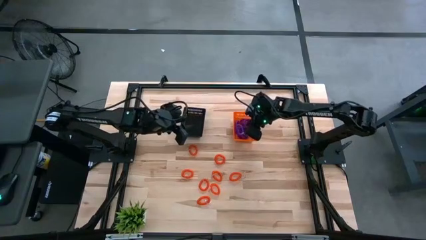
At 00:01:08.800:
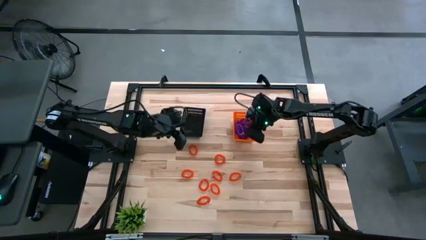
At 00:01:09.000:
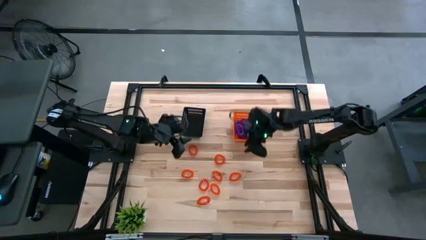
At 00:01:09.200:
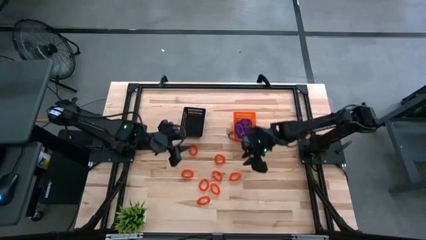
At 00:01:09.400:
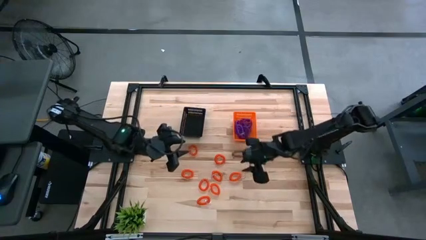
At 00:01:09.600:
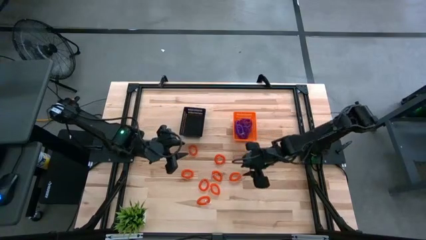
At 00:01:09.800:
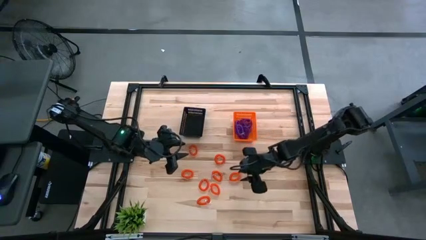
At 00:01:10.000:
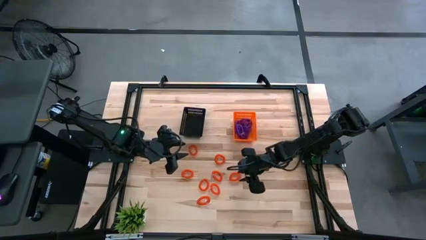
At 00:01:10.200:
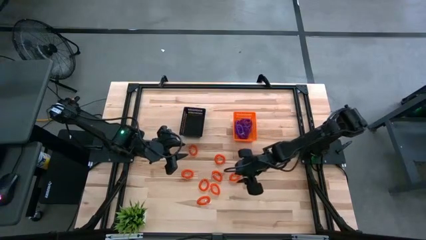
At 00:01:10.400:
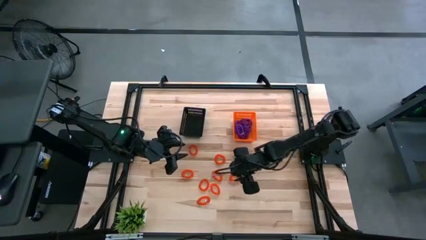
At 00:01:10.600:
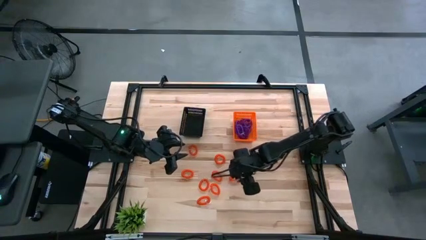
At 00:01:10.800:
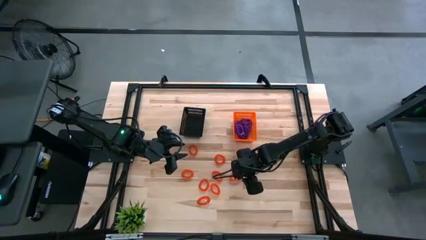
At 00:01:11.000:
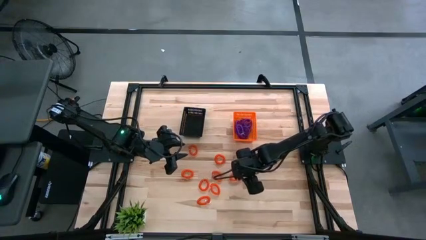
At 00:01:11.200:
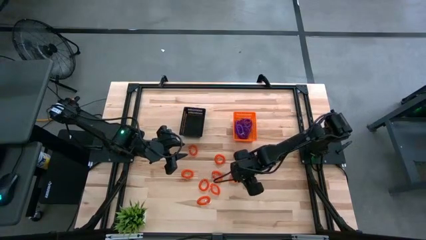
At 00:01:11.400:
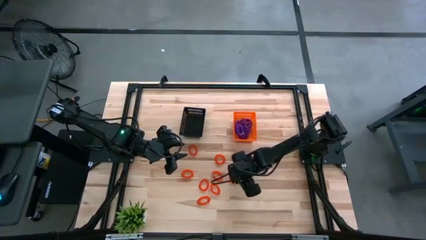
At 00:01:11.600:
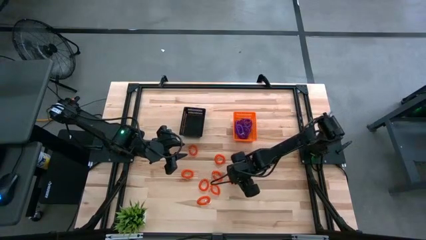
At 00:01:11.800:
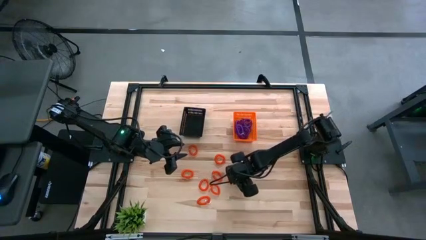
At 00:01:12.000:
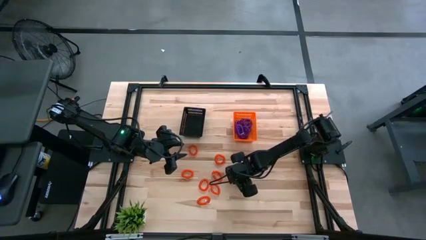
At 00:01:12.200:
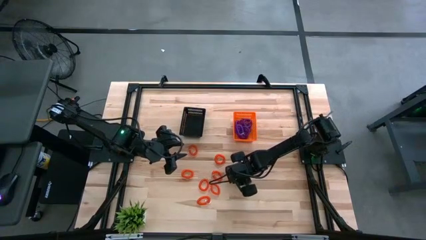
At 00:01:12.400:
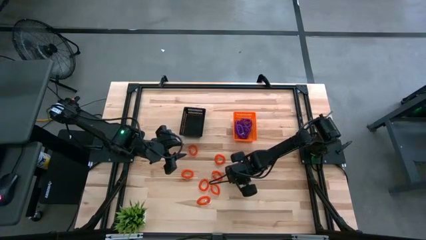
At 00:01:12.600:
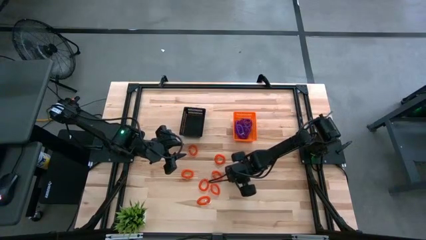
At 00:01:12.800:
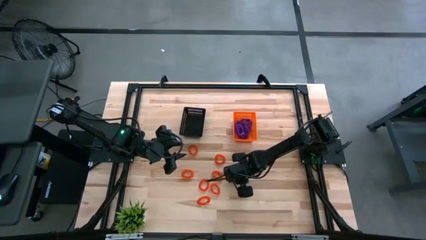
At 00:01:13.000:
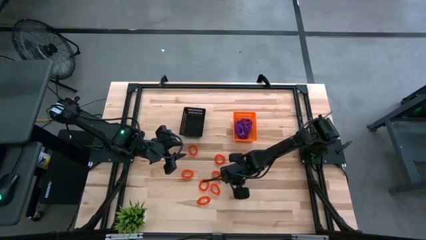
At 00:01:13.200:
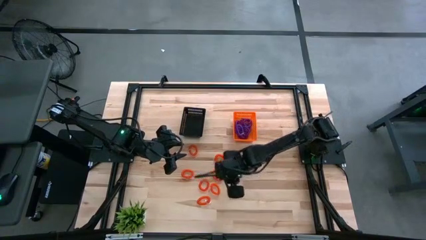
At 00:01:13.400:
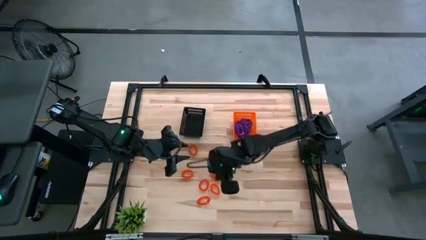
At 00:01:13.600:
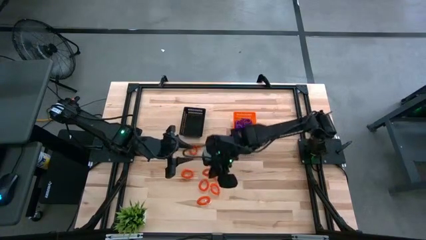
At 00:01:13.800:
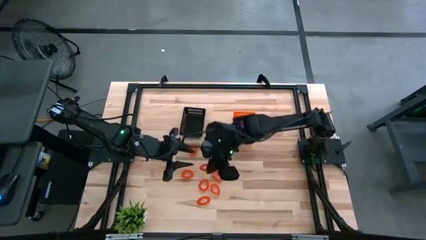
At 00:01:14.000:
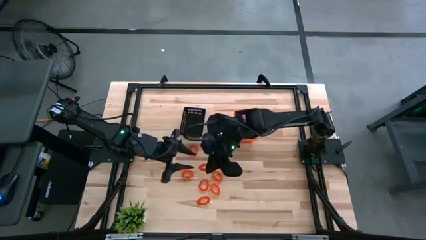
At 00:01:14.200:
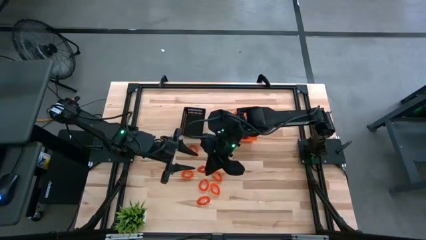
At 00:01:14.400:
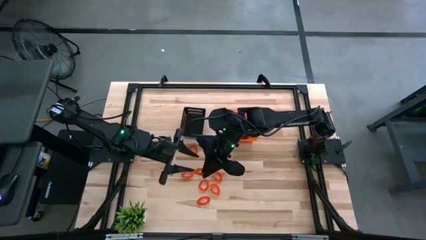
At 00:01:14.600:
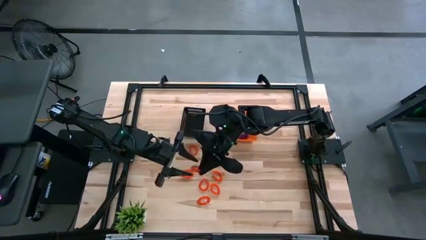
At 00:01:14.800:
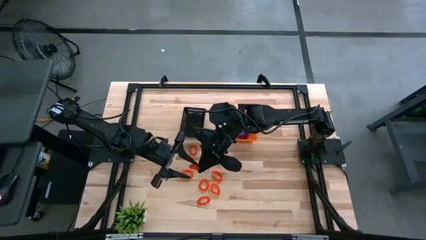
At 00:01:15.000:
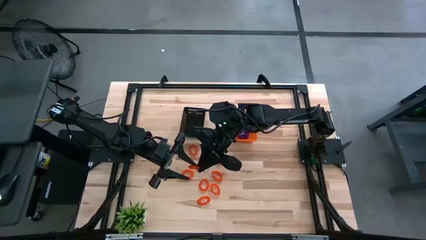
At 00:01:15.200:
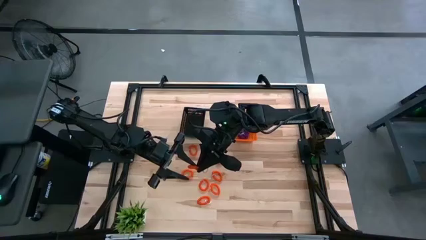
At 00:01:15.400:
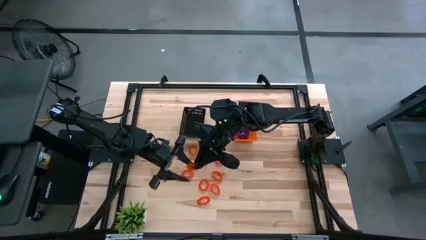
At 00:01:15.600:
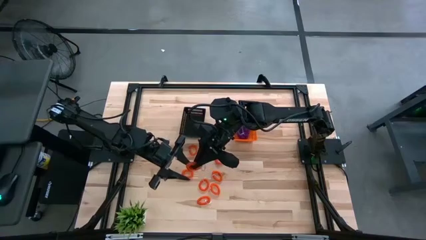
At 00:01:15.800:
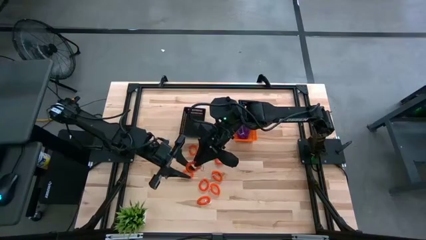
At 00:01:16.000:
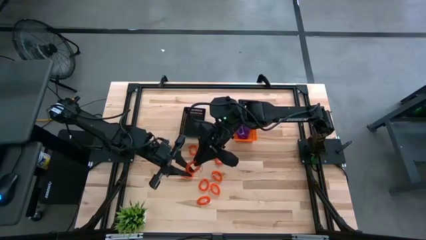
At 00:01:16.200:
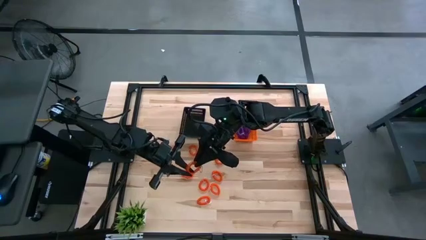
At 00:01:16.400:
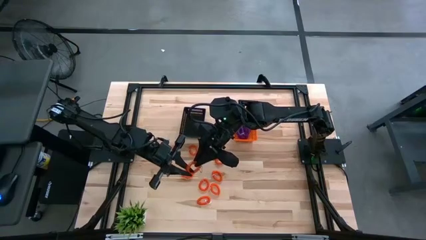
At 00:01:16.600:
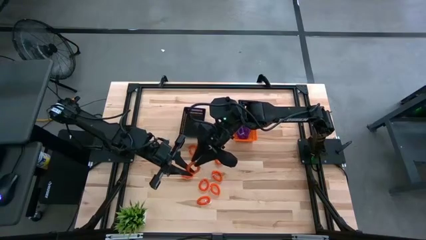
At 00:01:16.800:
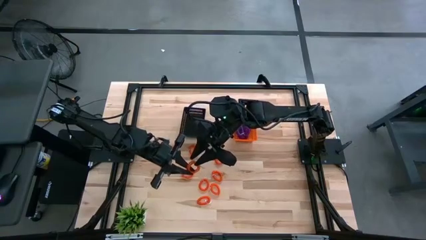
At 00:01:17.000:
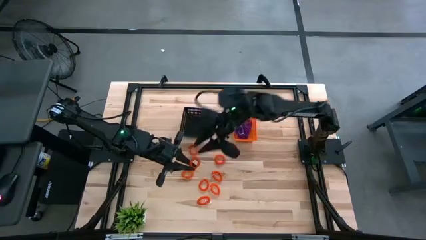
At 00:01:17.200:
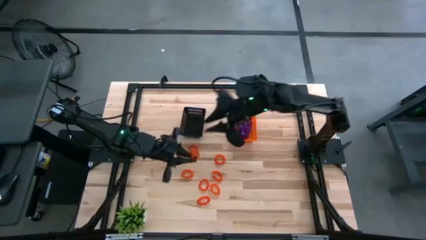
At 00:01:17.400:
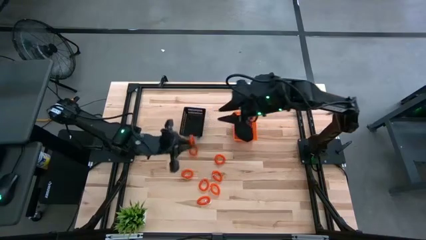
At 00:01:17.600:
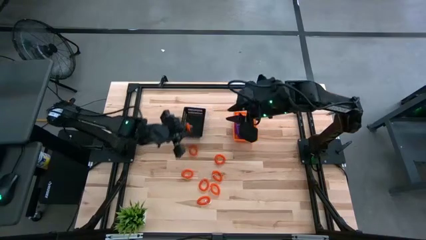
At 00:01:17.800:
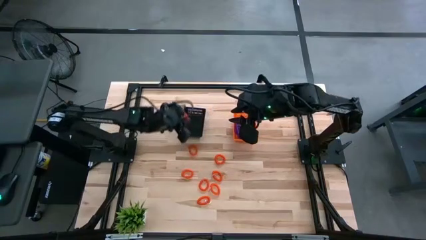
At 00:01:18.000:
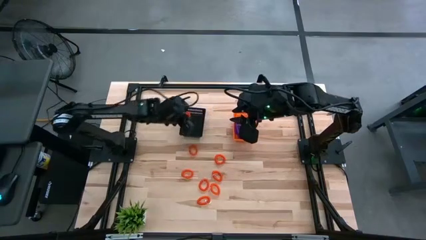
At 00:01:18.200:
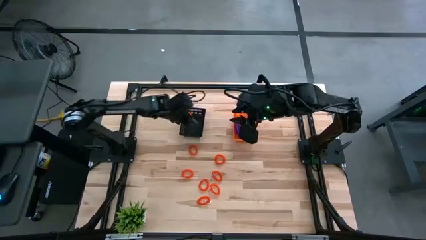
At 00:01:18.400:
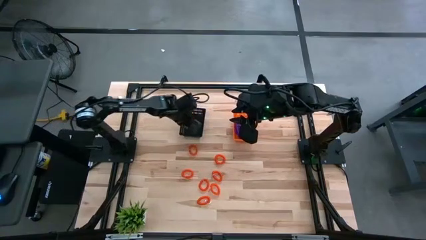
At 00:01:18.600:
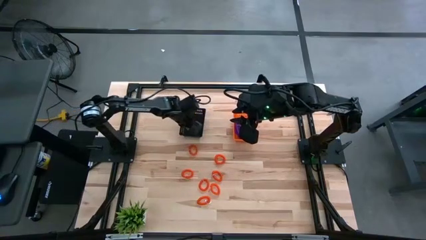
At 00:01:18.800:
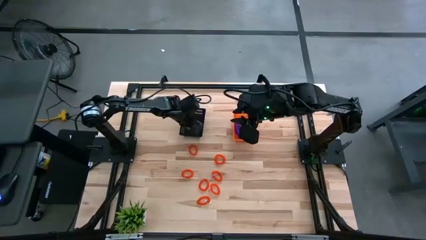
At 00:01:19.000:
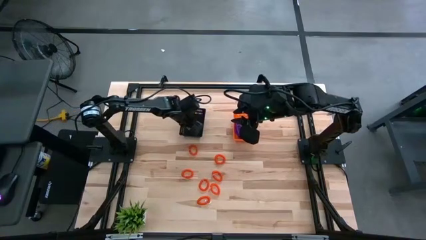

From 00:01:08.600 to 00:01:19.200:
Task: Sort spring keychains into baskets
Put the orange spring keychain into the black basket

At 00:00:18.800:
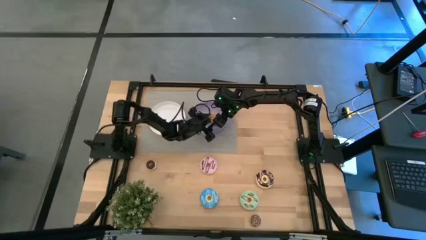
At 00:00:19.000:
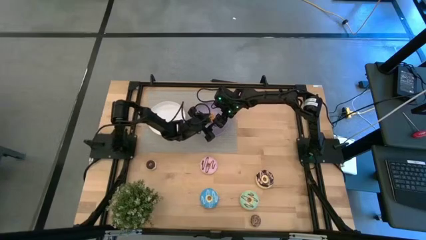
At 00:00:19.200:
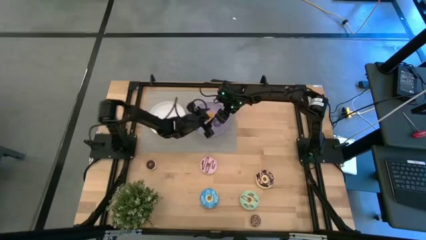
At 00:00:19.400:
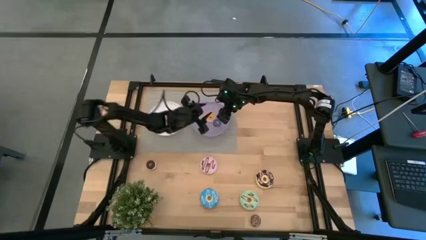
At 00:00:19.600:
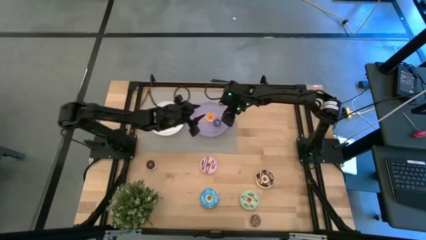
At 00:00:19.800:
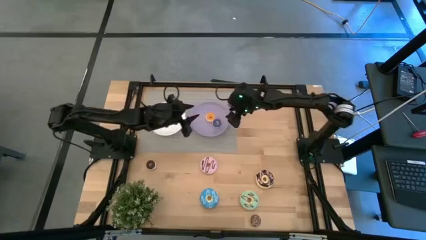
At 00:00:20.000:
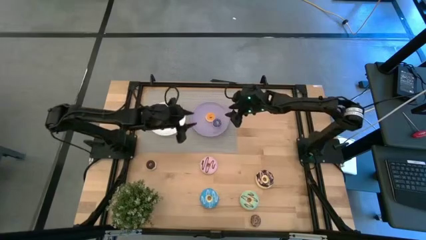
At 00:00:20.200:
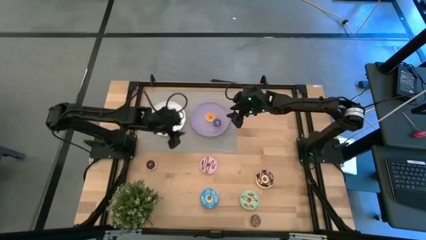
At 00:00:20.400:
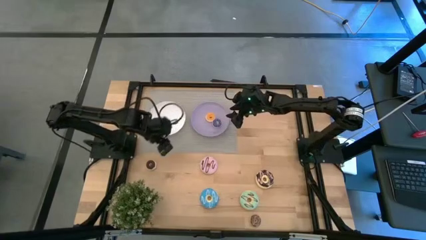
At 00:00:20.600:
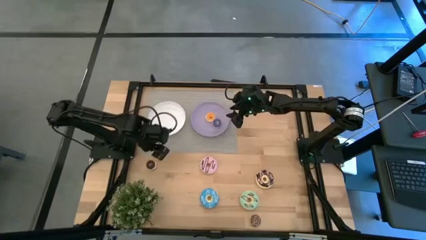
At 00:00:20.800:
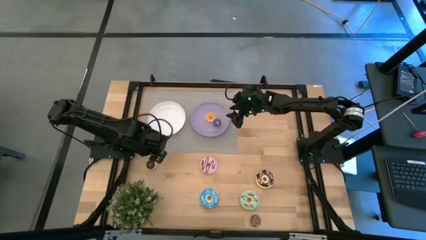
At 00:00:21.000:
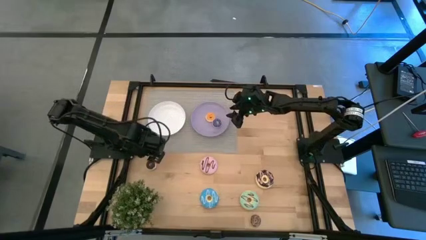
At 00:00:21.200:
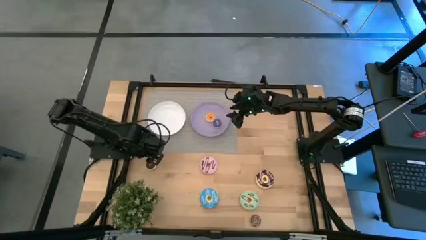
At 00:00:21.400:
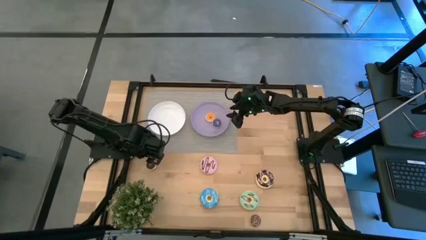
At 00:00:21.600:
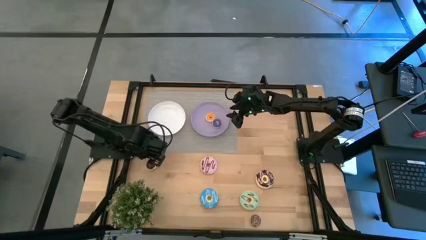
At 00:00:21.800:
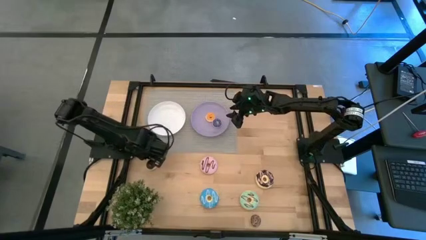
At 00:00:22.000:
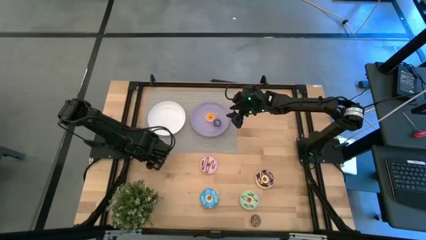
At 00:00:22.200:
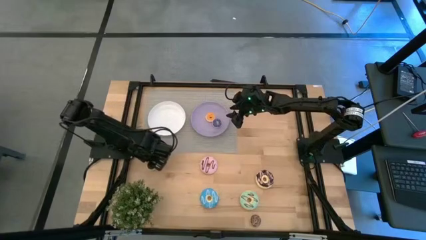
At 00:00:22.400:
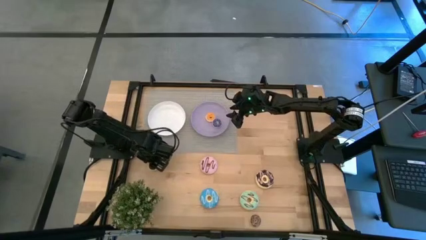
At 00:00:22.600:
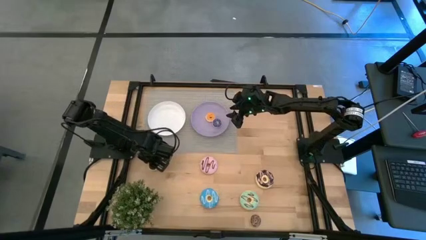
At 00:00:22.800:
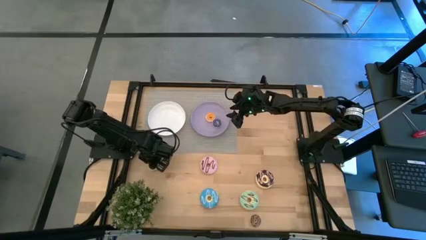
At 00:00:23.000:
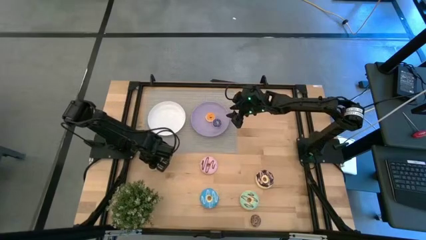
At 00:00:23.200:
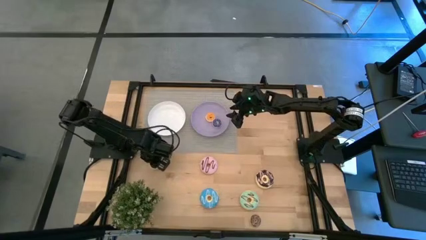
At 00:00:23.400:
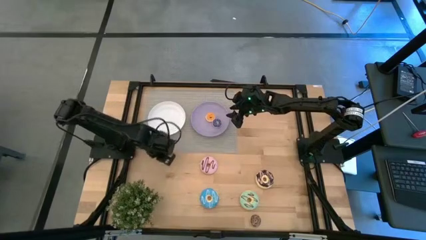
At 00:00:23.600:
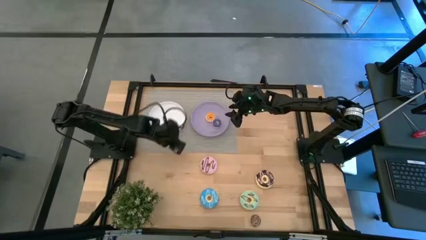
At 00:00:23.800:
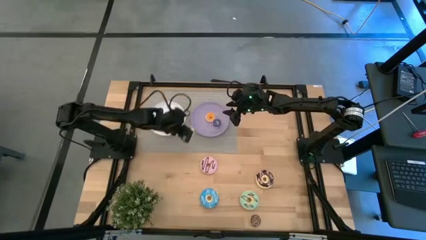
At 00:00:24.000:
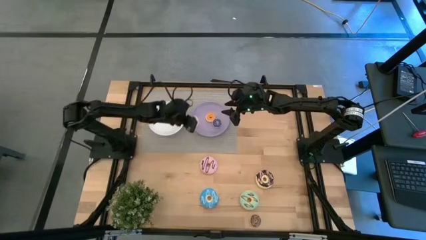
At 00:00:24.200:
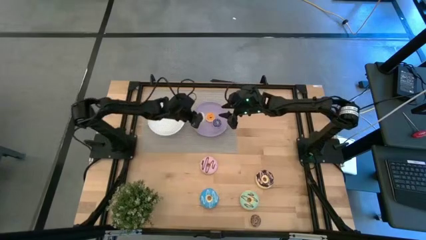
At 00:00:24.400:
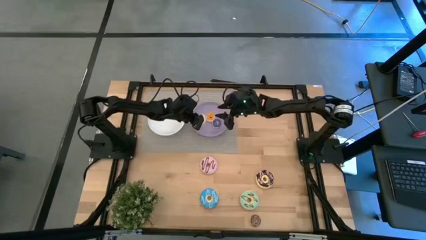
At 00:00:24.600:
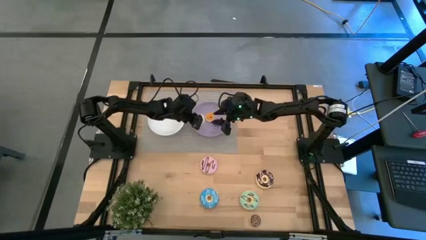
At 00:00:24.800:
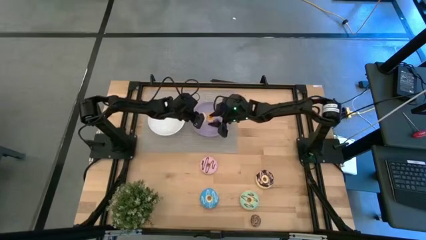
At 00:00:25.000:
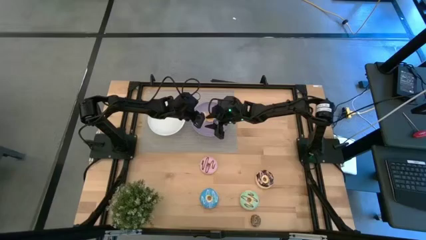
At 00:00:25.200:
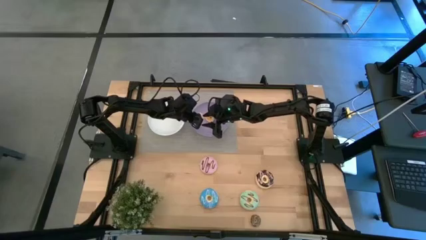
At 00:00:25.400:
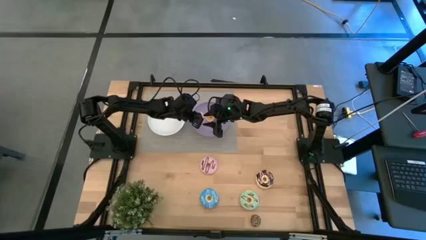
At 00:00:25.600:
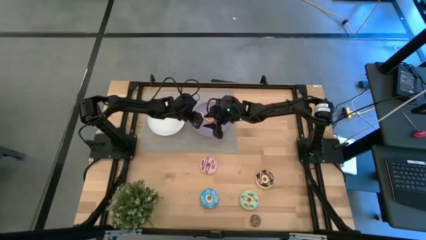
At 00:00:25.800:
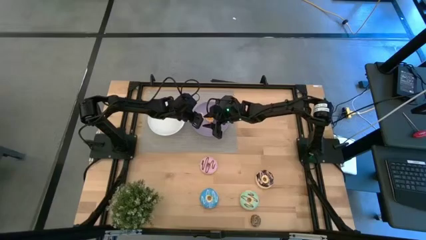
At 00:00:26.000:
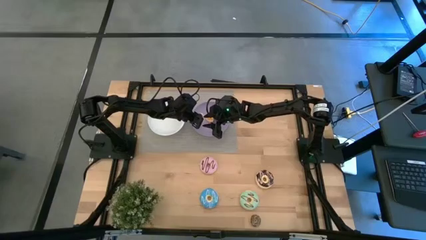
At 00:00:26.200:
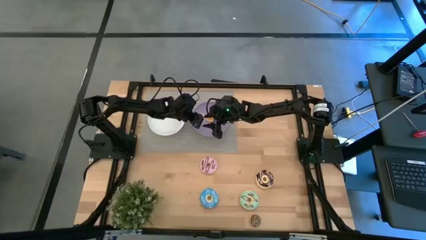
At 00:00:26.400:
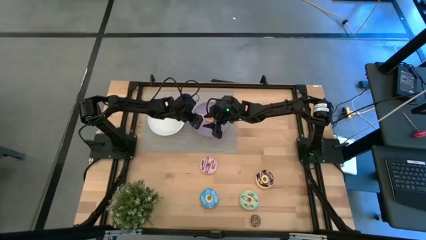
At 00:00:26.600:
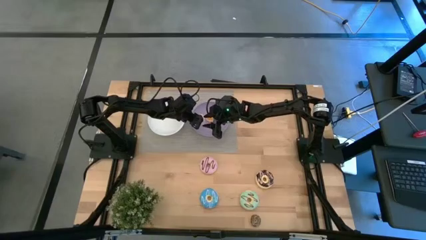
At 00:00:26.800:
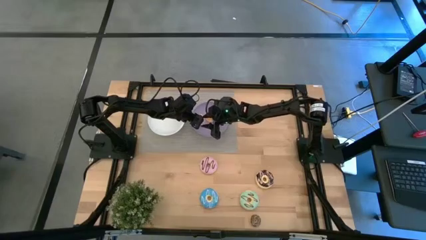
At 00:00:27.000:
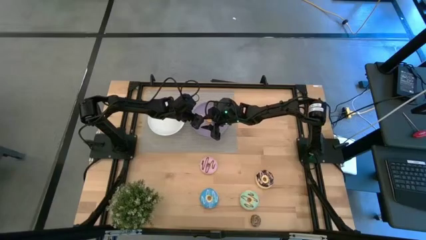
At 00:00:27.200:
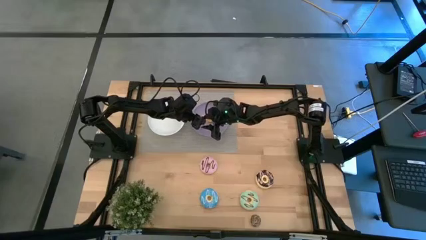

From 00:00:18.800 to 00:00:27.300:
Task: Pick & Place donuts
Put the small brown donut on the purple plate
